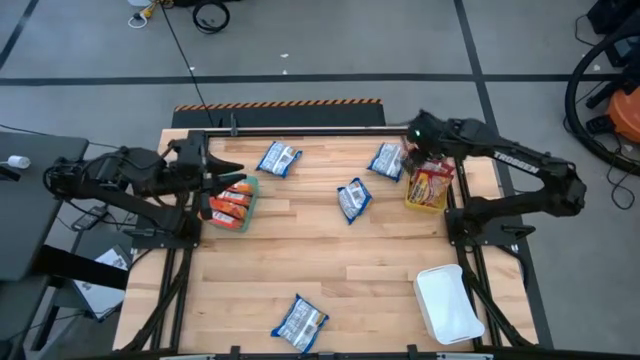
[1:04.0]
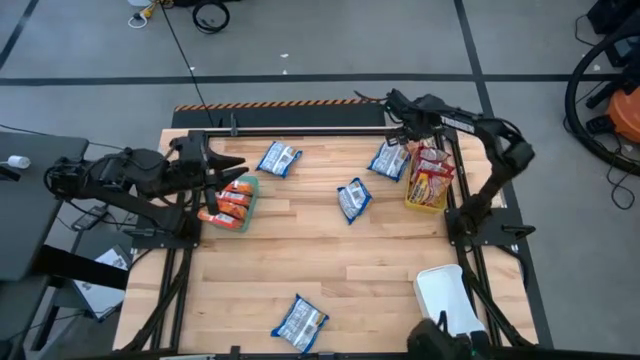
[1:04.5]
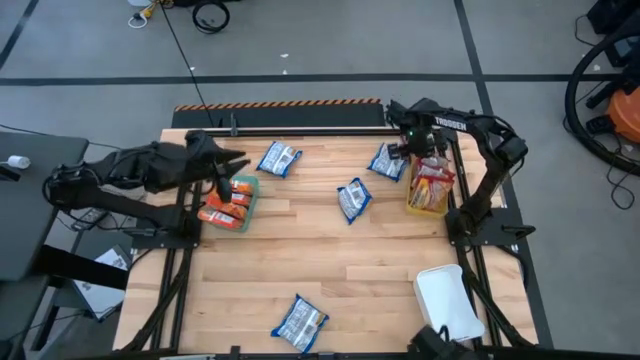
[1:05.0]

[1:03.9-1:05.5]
Task: Sort Maruchan noodles
Adjust the yellow bin

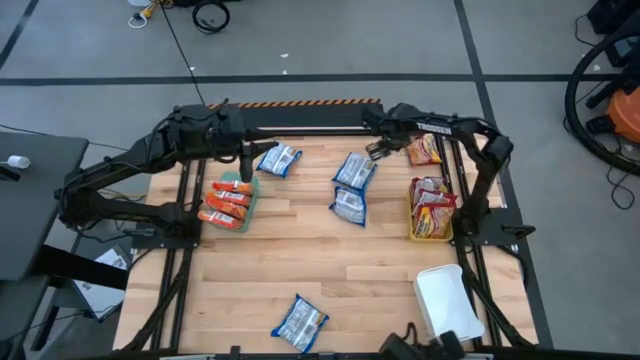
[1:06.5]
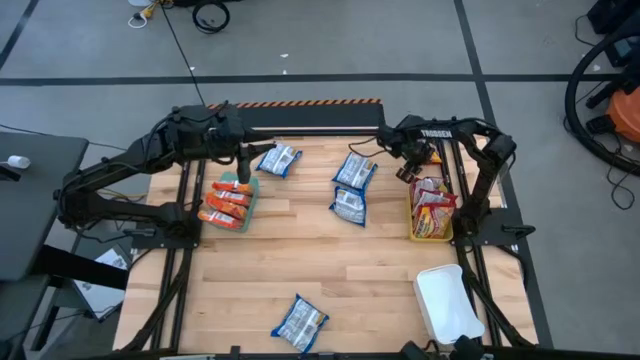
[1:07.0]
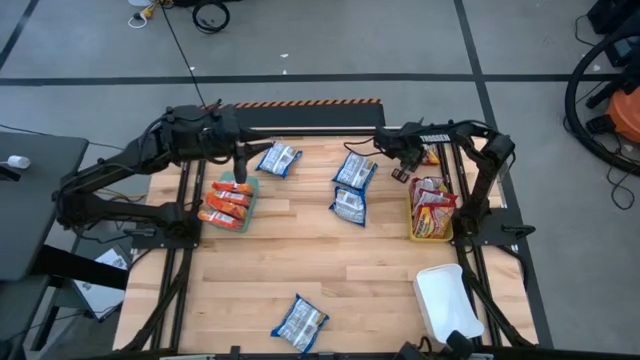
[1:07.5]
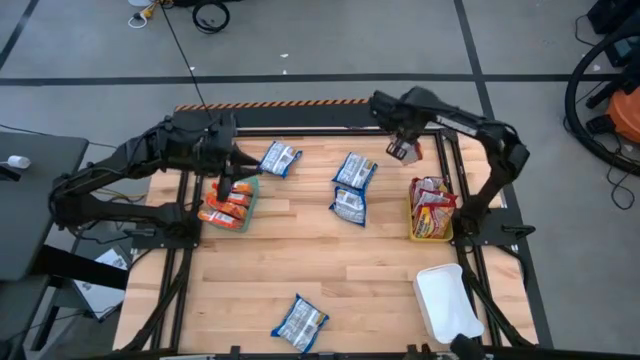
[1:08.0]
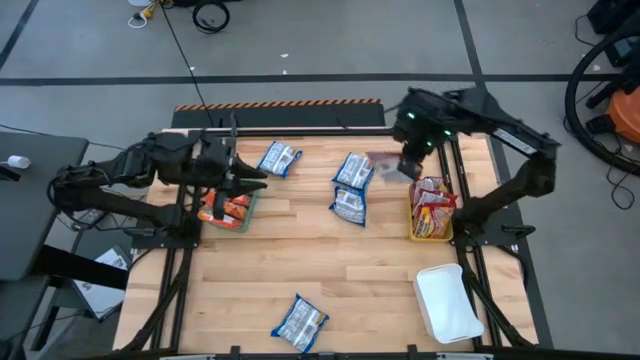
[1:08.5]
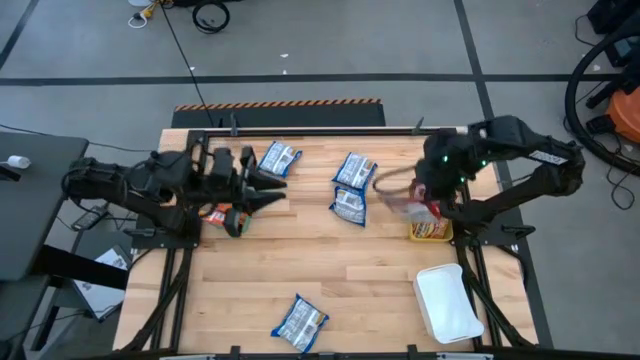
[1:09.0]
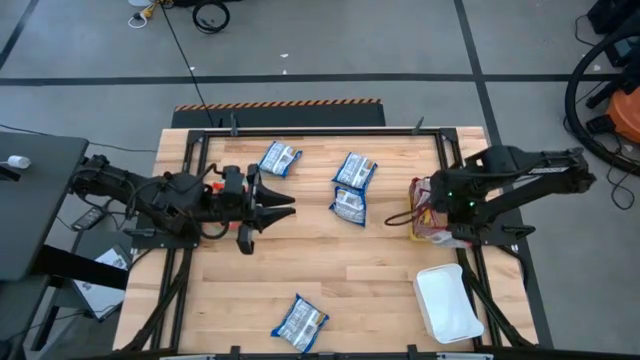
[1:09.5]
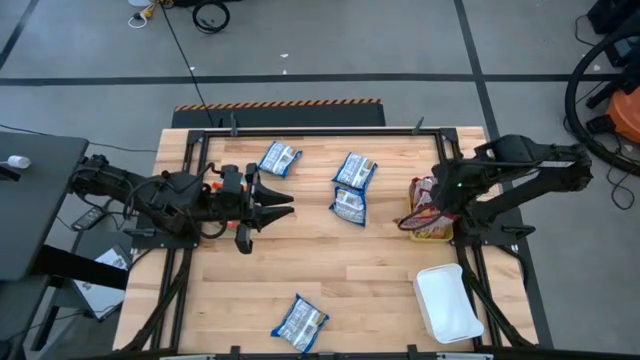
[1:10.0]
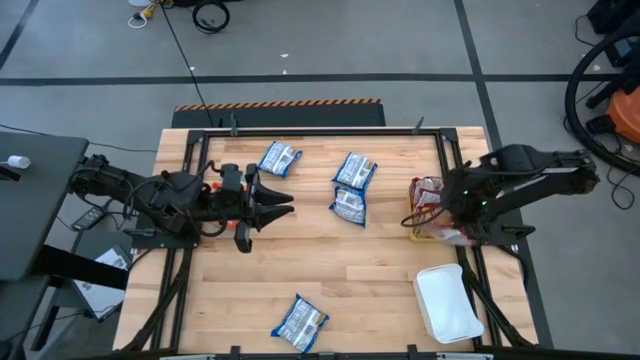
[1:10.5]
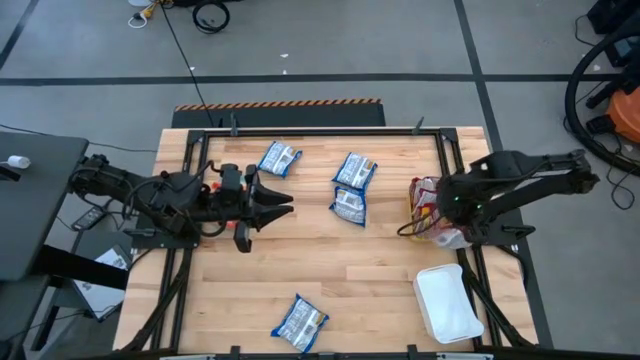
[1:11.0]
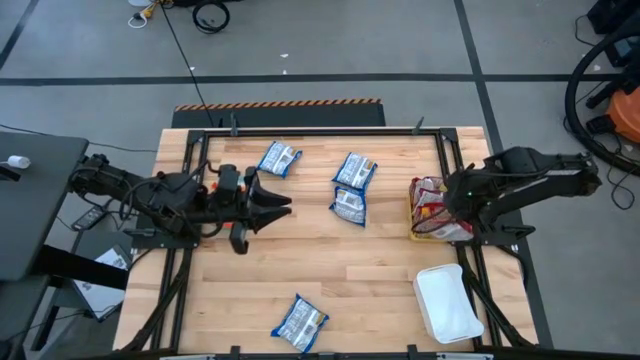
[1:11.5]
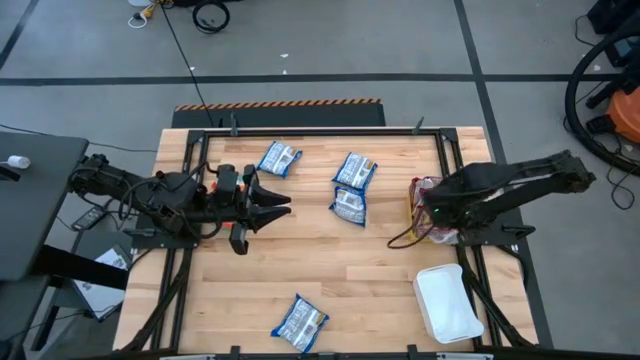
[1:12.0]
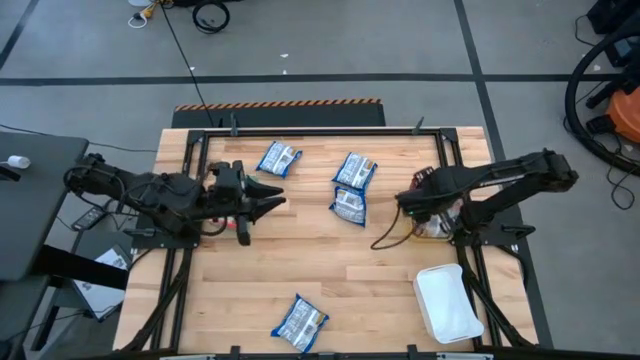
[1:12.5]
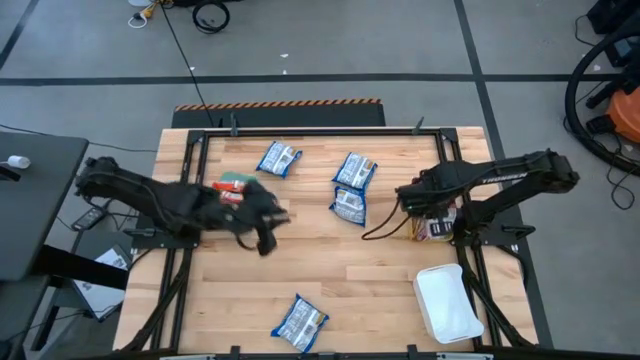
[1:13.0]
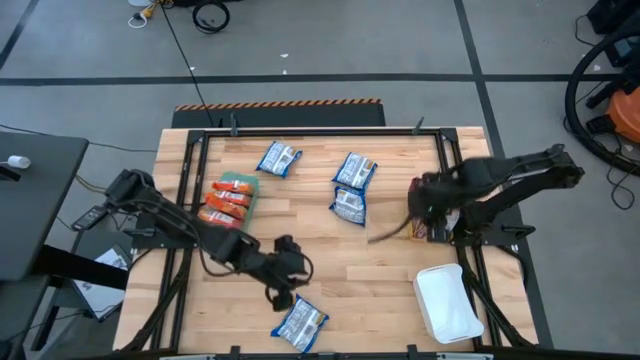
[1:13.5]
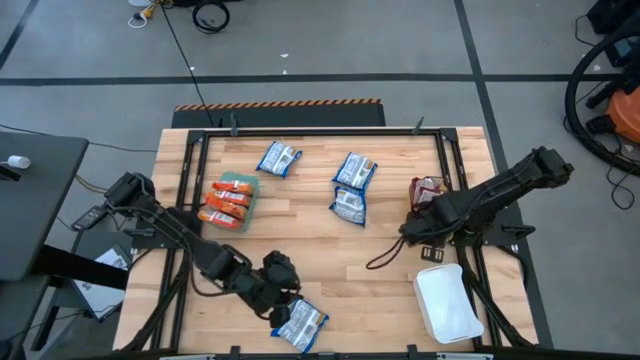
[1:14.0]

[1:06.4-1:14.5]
Put the red noodle pack into the yellow bin

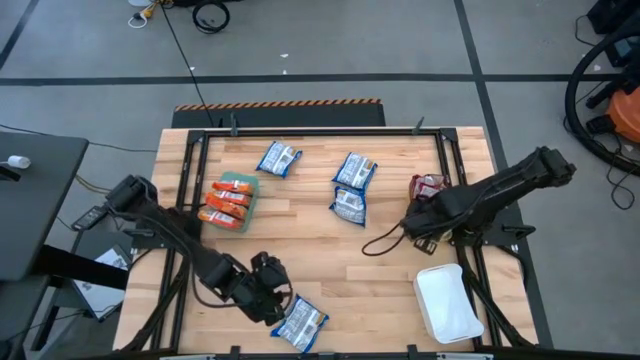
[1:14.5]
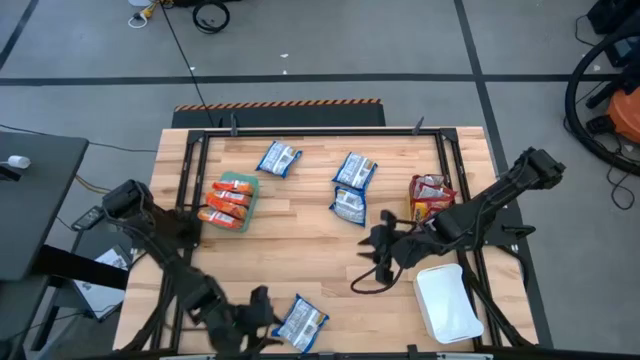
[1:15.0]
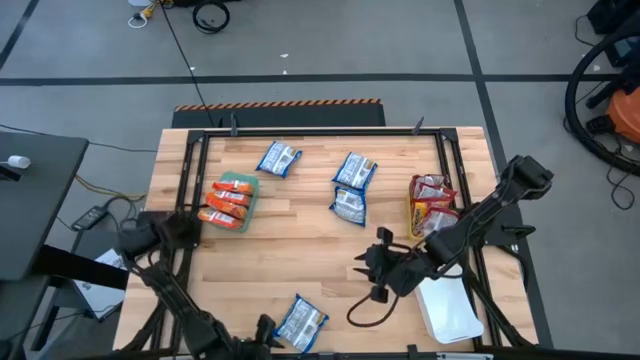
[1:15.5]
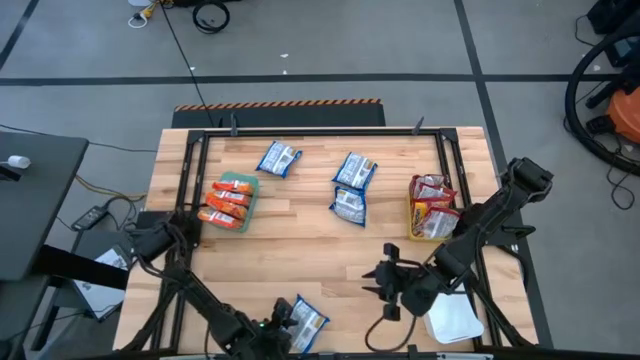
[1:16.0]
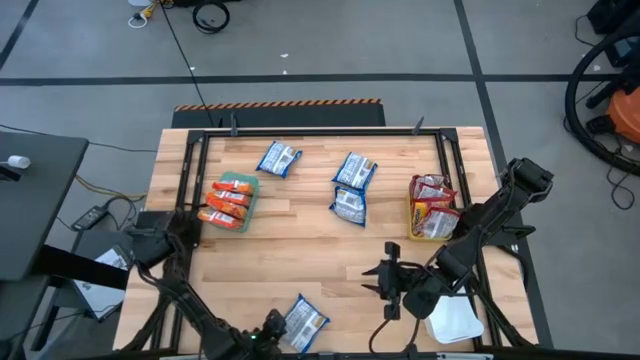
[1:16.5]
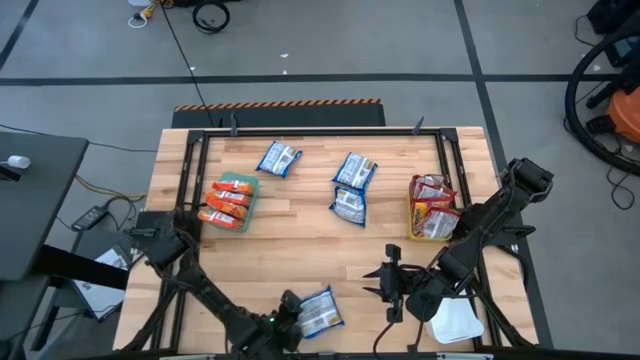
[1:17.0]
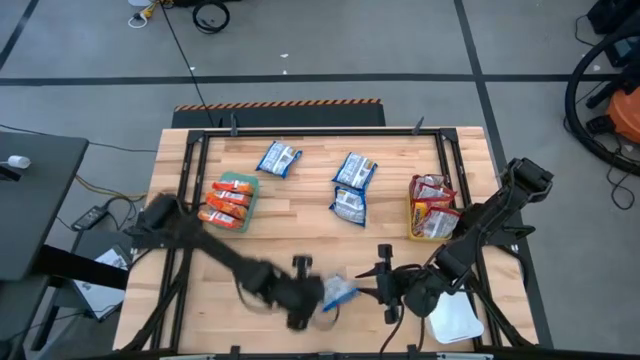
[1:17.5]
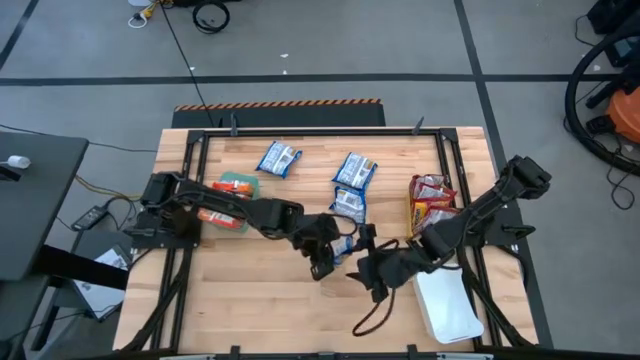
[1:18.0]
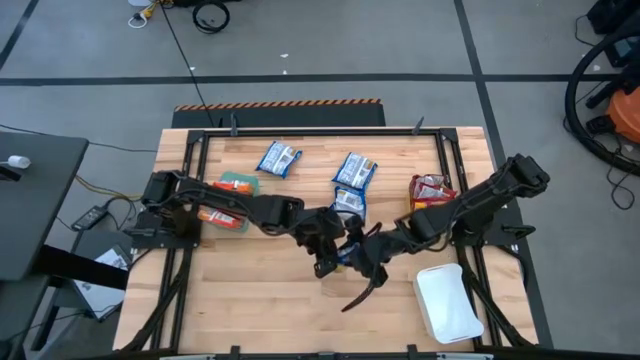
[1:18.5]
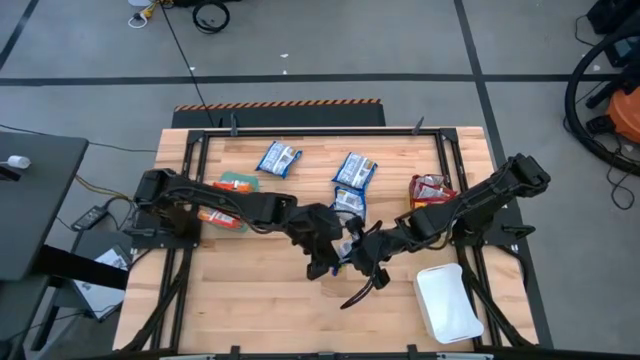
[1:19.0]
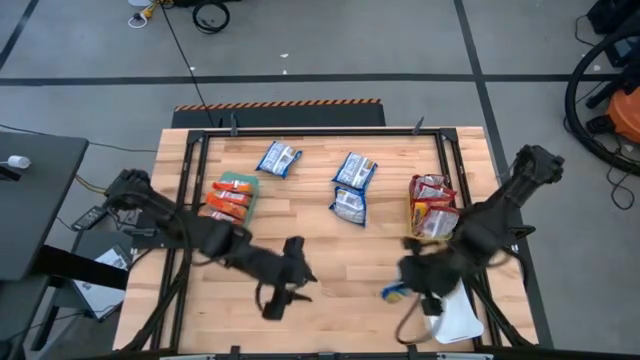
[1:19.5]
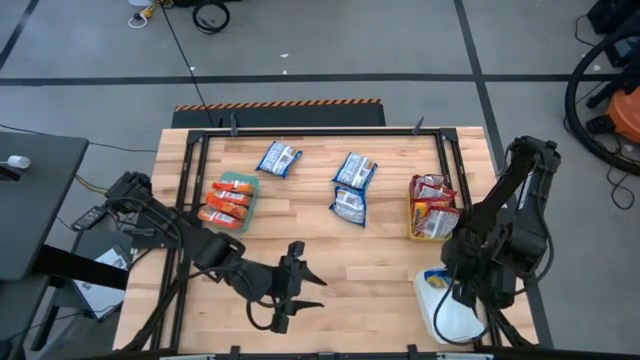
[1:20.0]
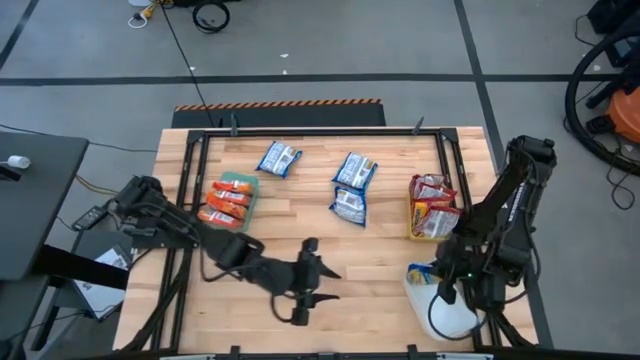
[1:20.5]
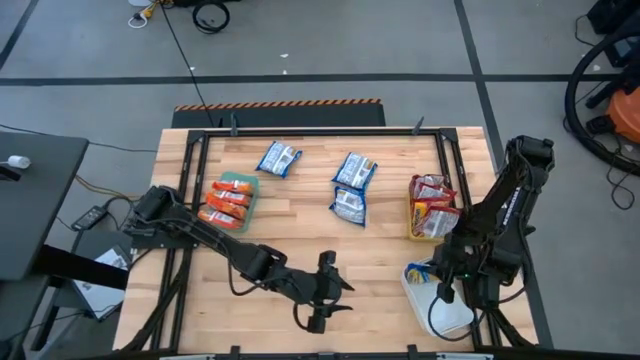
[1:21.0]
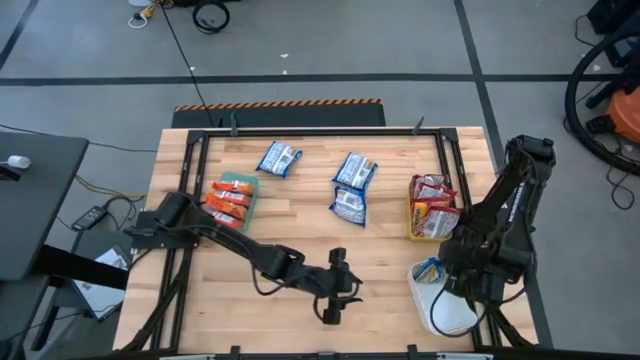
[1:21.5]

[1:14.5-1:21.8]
Put the blue noodle pack into the white bin

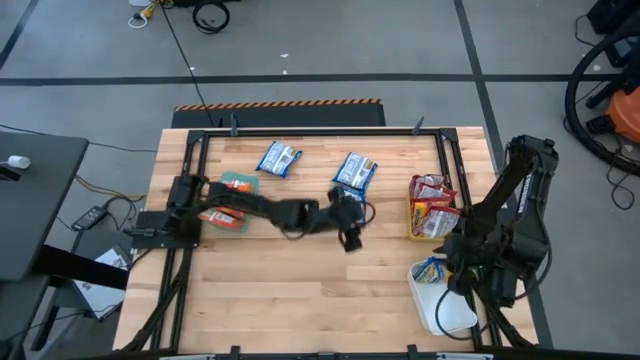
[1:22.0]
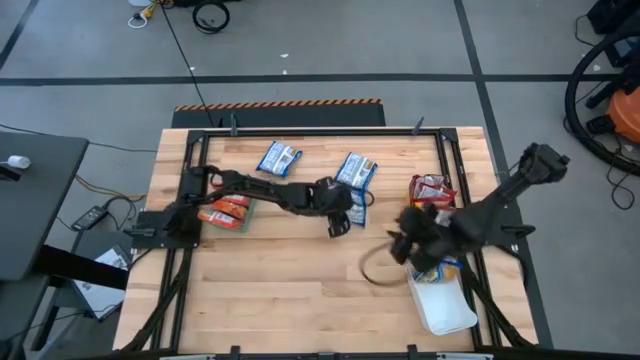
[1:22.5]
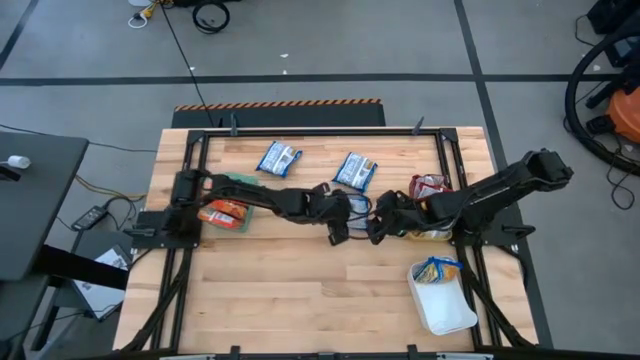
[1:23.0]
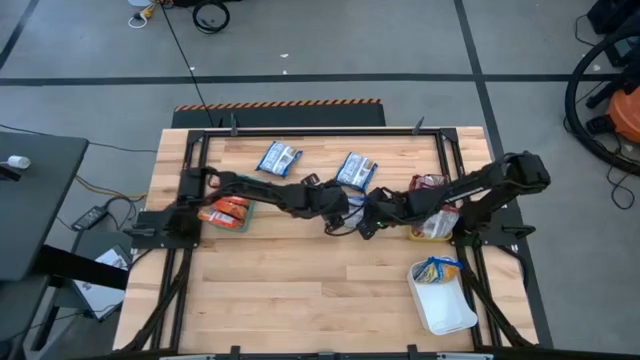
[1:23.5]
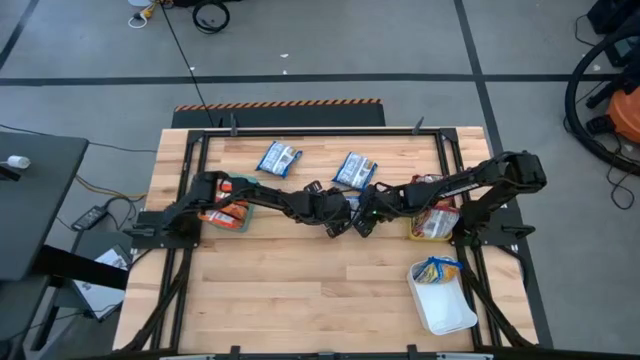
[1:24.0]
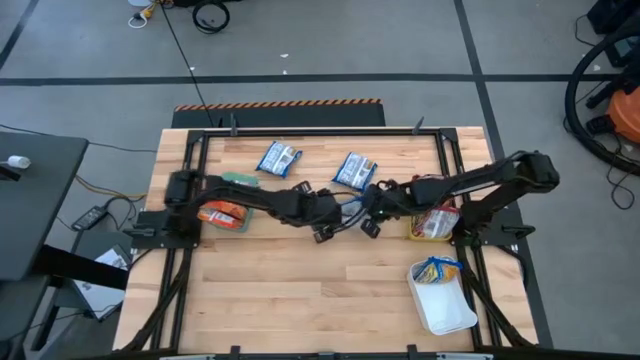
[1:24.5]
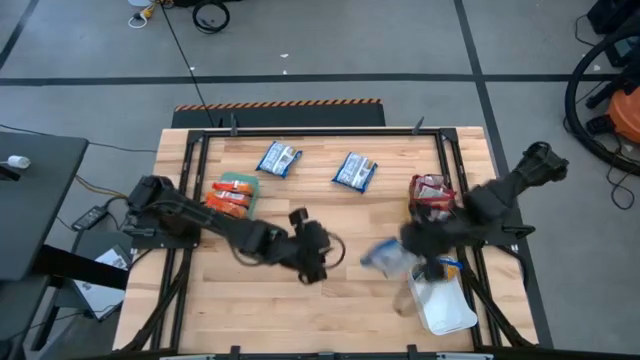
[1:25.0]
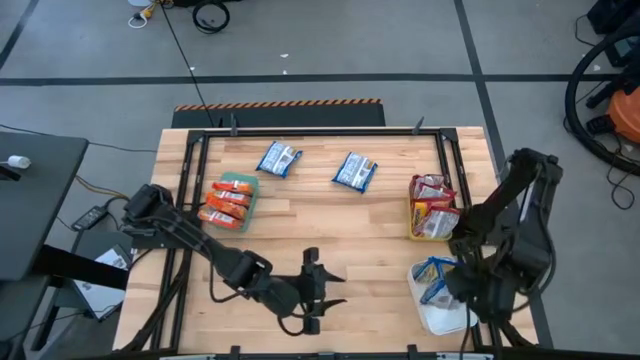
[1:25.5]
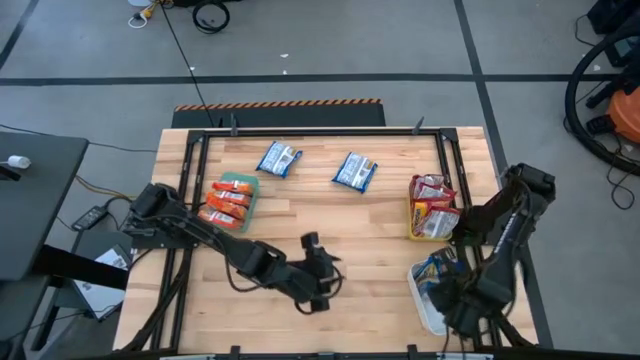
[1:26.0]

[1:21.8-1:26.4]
Put the blue noodle pack into the white bin
